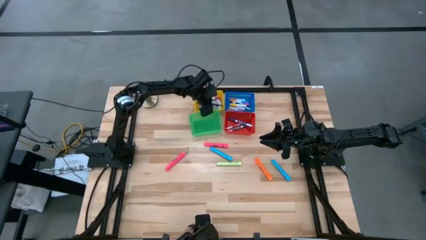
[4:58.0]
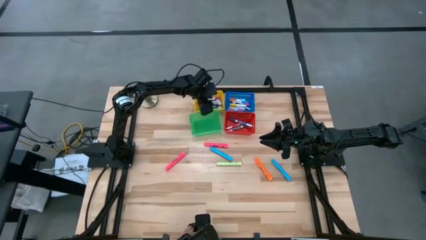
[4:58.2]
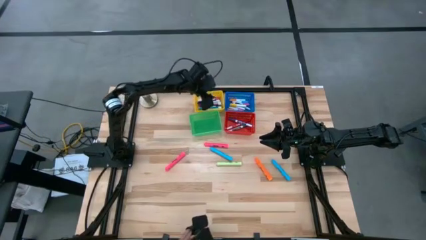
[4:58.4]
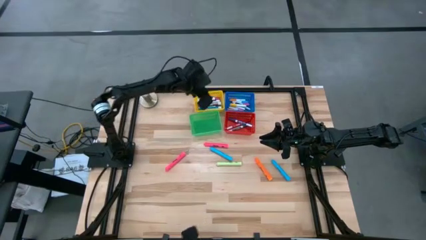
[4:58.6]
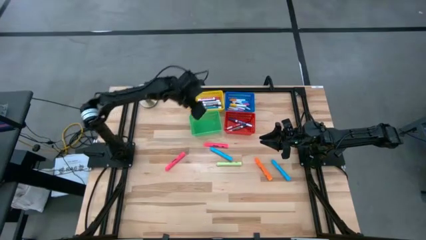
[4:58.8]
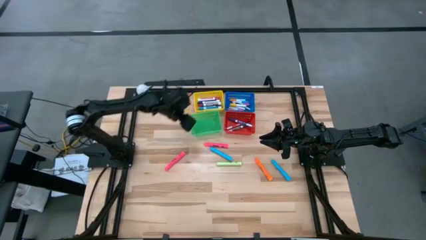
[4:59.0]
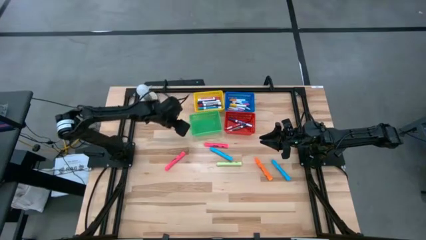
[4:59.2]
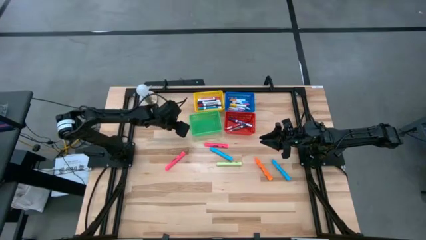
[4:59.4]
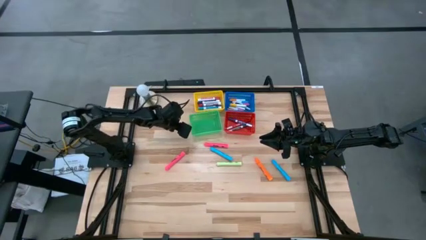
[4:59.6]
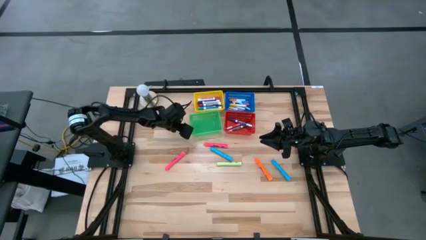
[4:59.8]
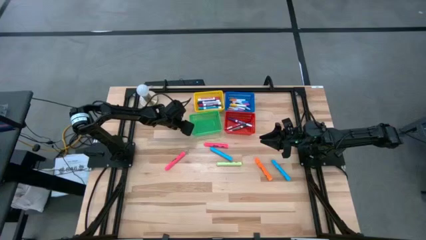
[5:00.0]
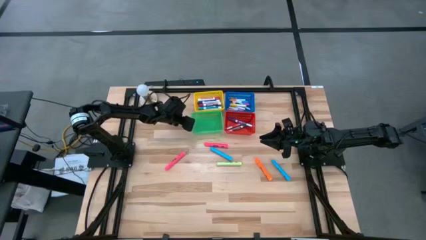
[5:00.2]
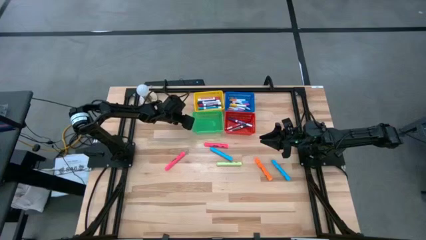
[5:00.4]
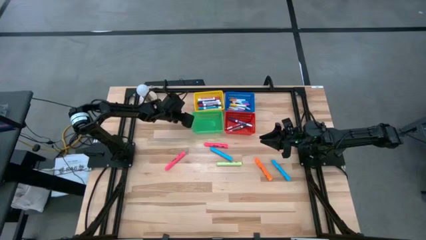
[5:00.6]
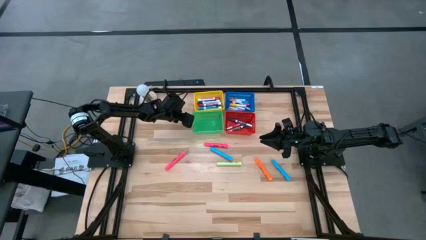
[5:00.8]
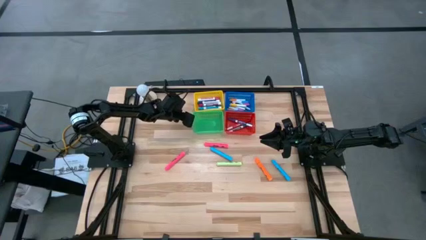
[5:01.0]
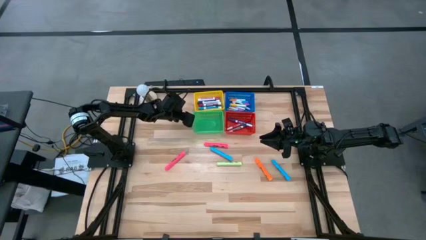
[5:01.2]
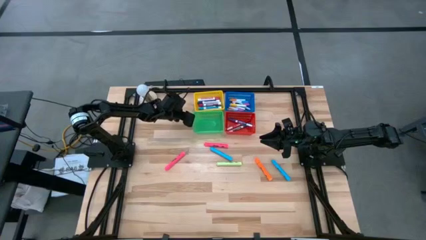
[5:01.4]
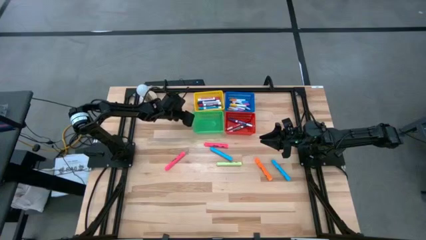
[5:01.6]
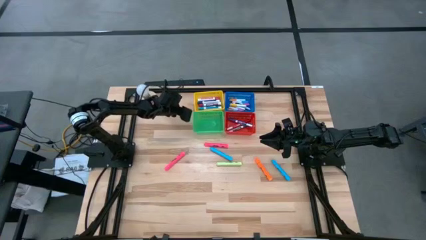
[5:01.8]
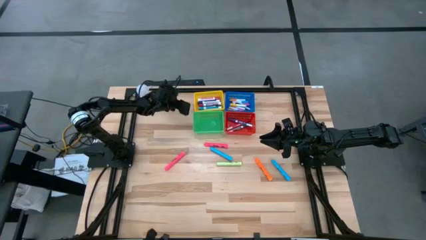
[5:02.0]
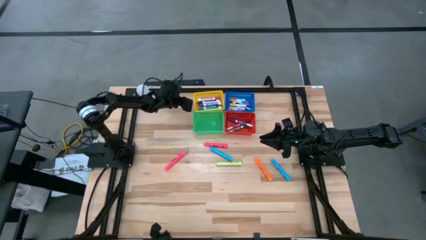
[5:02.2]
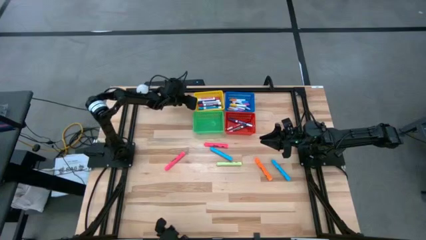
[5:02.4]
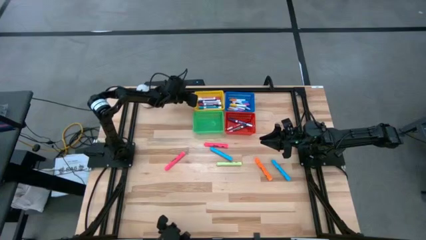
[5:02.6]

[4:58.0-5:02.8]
Task: Pick & Place Markers
Adjust the green and yellow bins

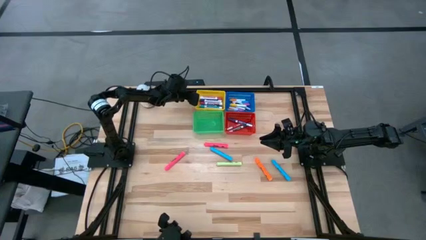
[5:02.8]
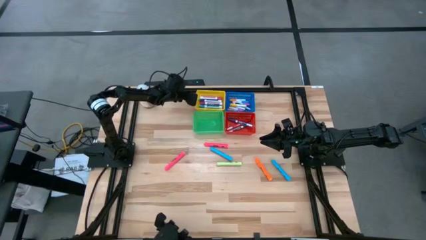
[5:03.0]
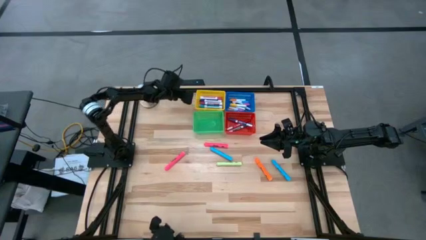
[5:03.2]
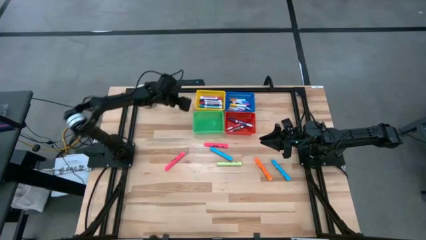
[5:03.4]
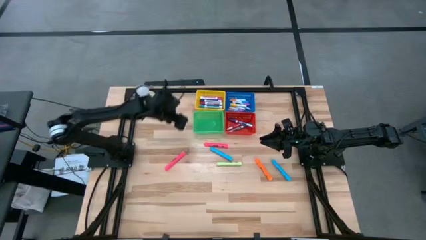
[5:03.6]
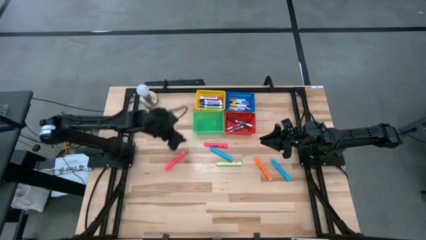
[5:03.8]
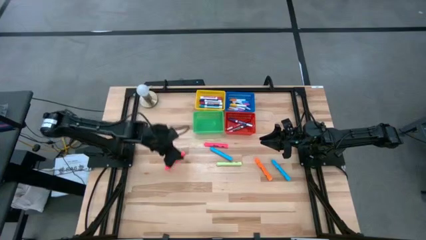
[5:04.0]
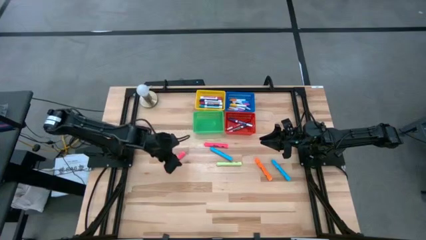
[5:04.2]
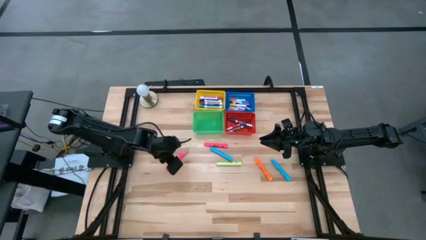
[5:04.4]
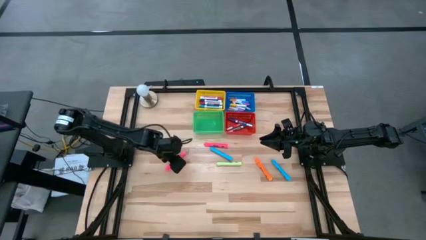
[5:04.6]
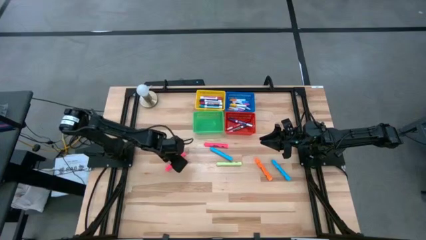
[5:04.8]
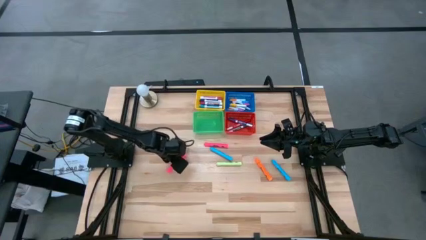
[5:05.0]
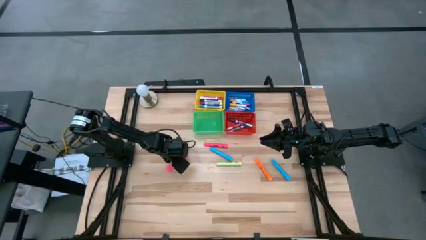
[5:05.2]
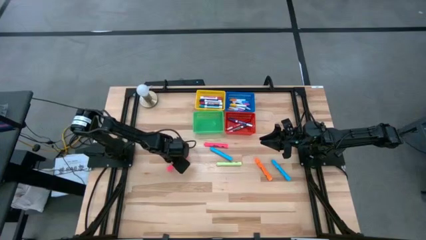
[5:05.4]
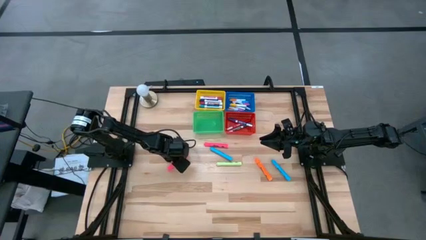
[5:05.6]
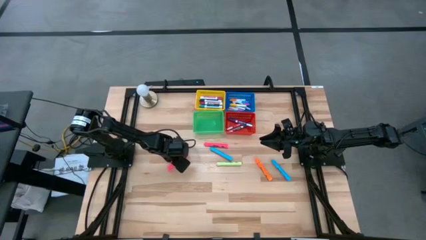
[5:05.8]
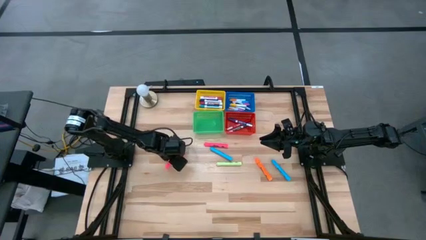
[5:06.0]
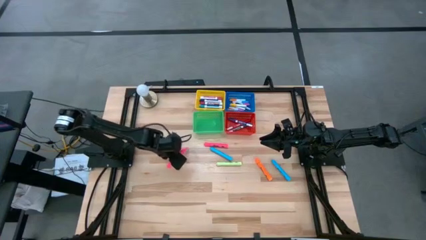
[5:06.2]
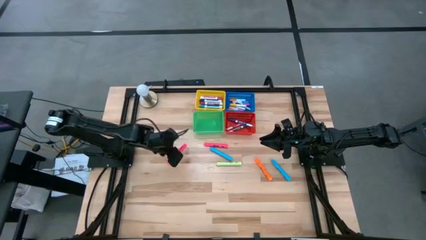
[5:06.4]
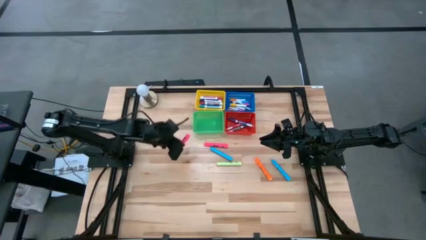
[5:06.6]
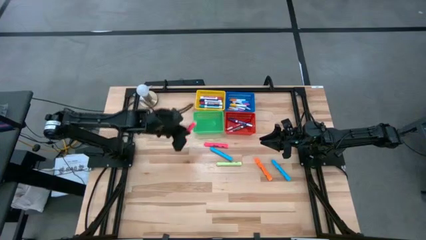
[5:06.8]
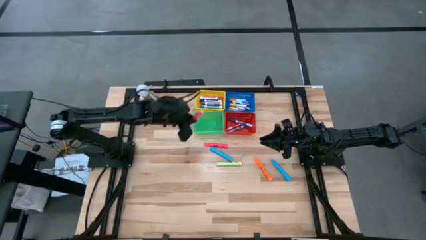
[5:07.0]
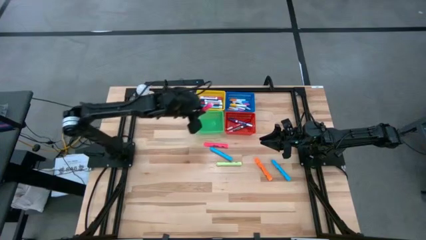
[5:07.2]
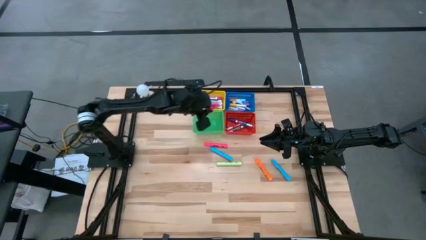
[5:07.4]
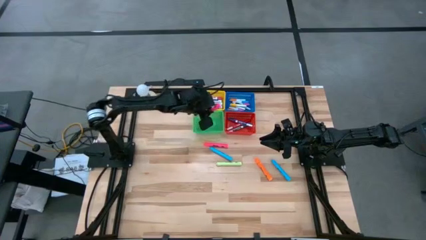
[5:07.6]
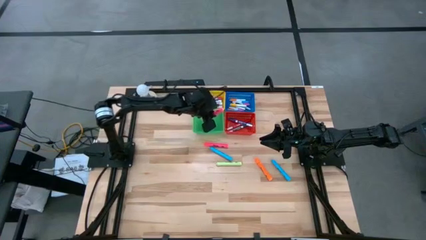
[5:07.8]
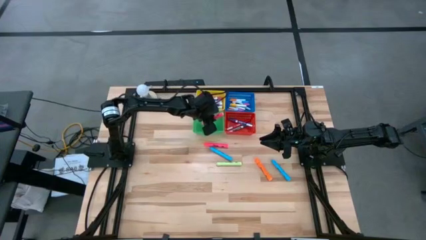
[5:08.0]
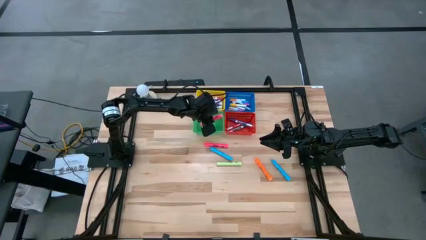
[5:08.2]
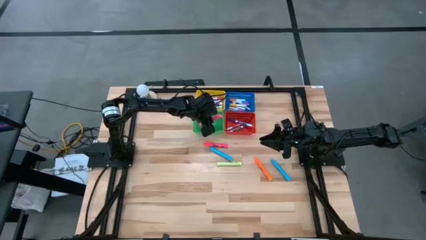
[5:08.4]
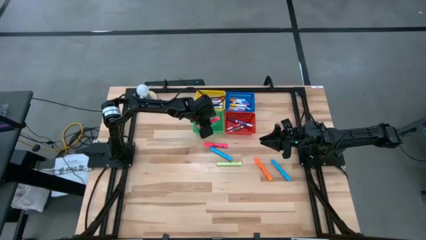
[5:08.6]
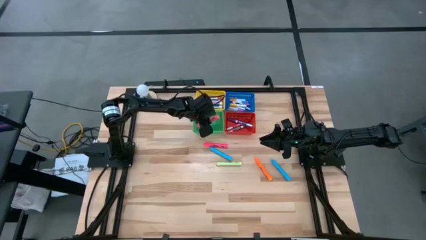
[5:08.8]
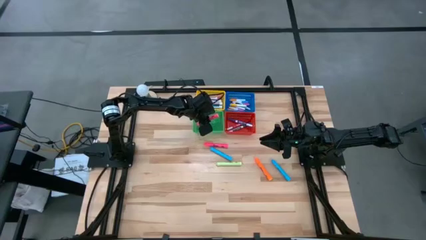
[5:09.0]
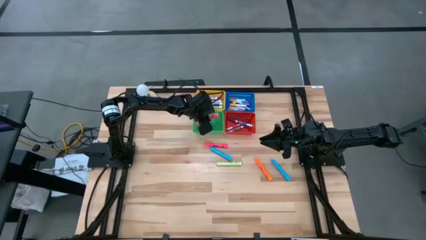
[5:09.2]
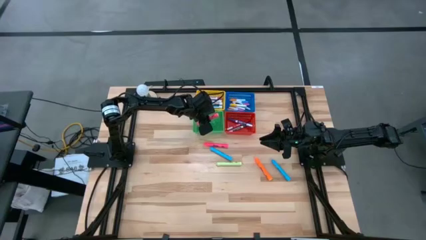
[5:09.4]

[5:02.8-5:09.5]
Put the bottom large pink highlighter pen into the green bin
